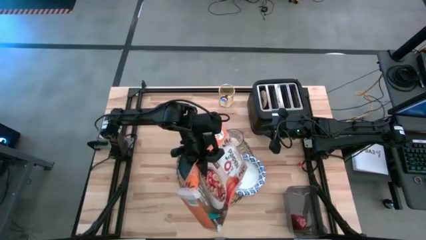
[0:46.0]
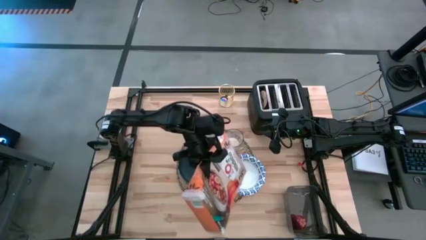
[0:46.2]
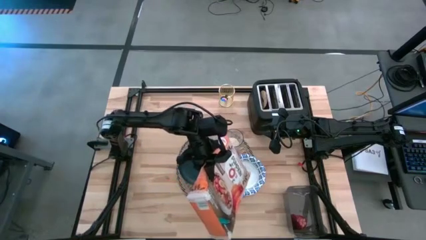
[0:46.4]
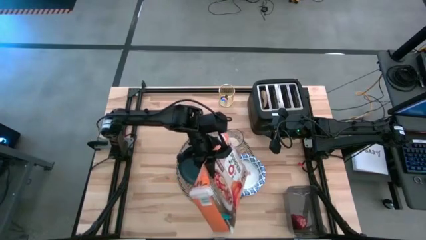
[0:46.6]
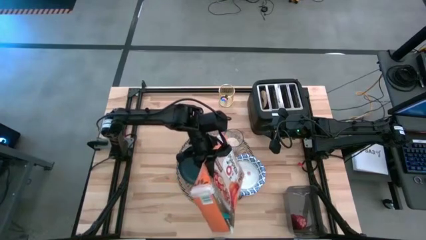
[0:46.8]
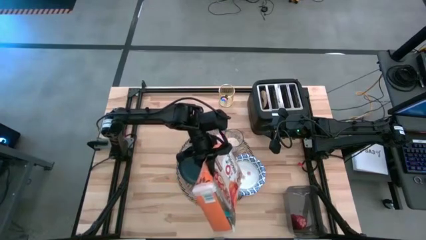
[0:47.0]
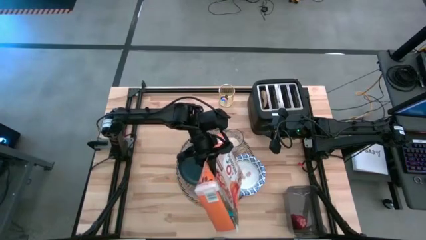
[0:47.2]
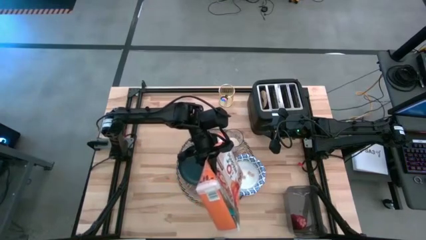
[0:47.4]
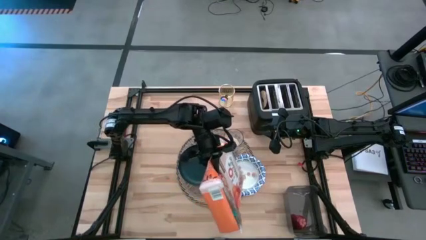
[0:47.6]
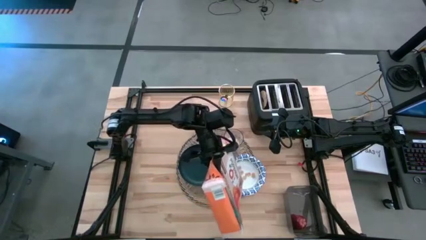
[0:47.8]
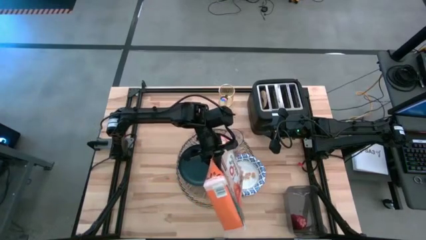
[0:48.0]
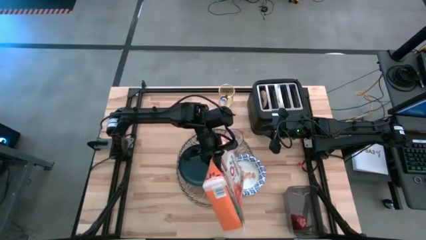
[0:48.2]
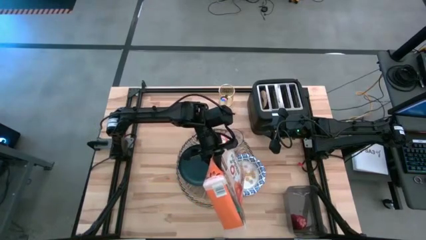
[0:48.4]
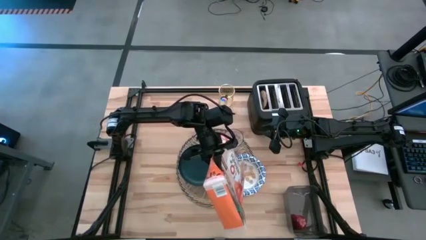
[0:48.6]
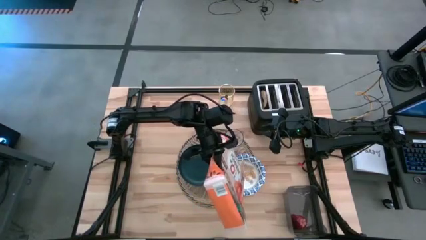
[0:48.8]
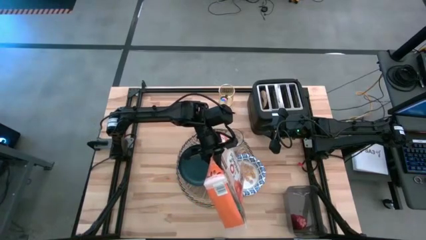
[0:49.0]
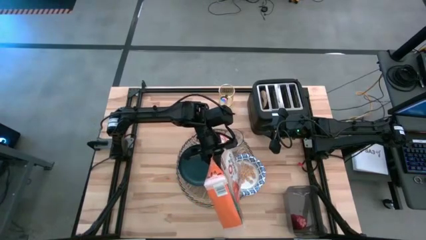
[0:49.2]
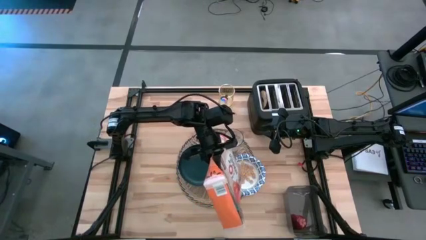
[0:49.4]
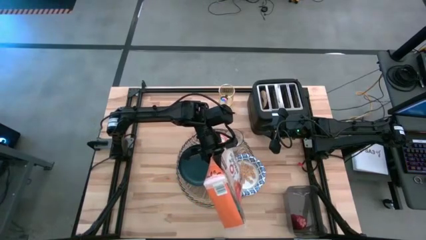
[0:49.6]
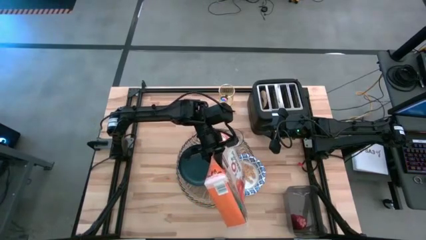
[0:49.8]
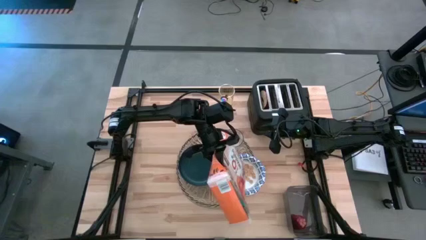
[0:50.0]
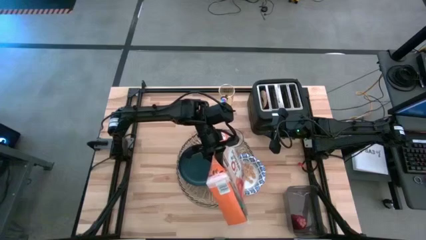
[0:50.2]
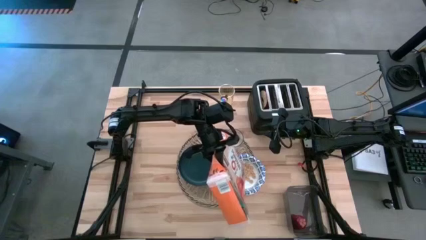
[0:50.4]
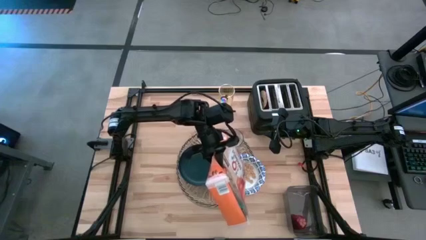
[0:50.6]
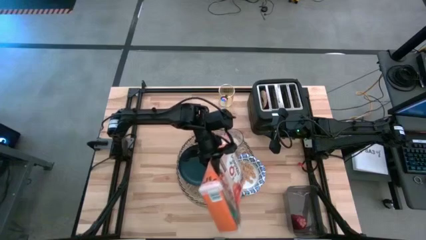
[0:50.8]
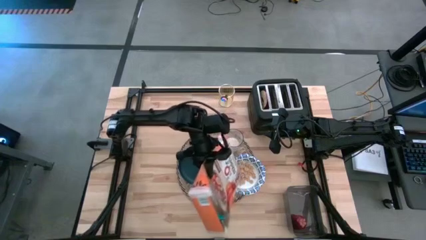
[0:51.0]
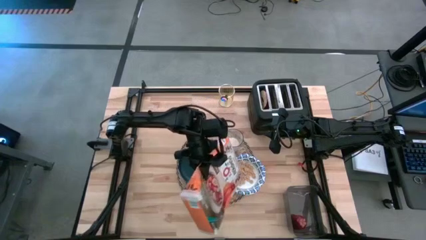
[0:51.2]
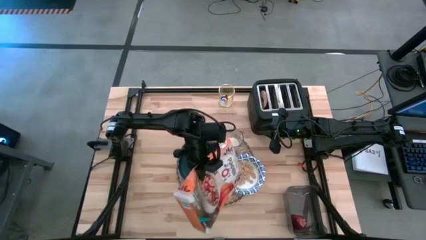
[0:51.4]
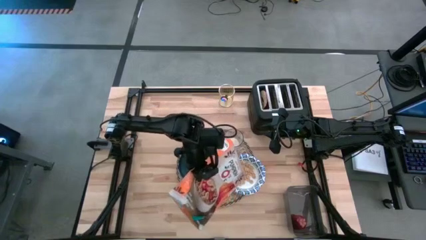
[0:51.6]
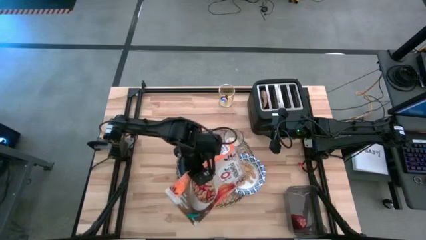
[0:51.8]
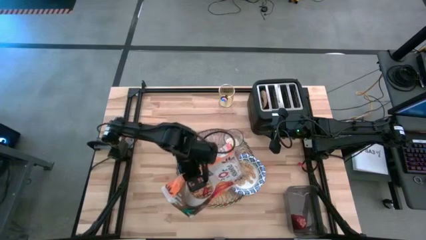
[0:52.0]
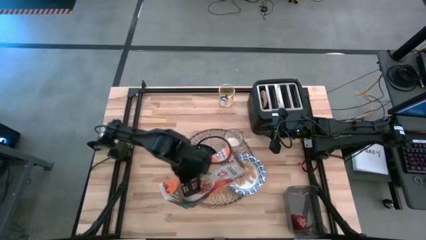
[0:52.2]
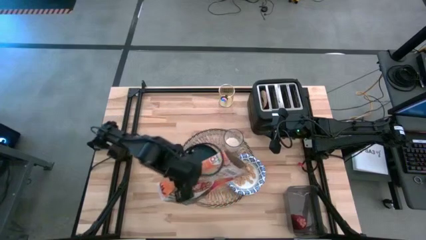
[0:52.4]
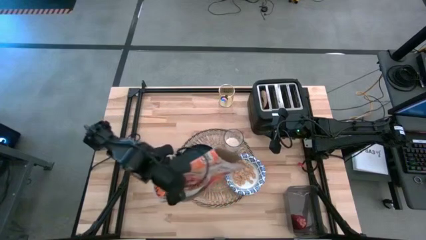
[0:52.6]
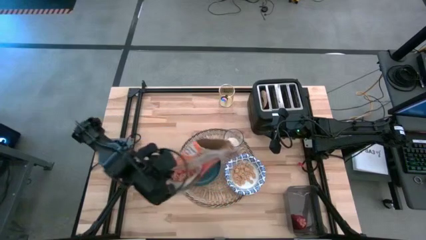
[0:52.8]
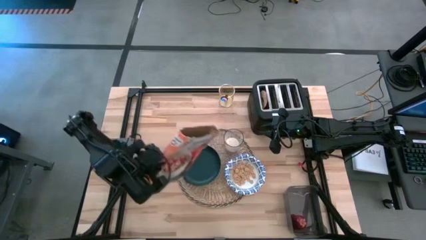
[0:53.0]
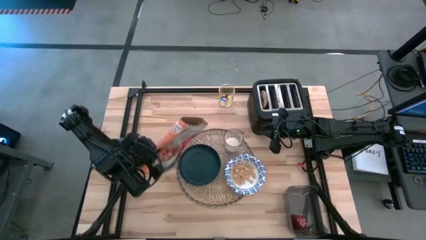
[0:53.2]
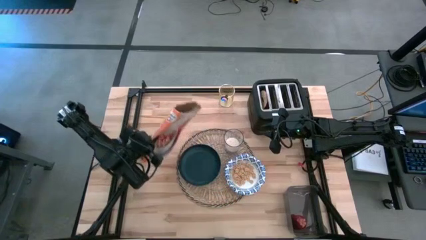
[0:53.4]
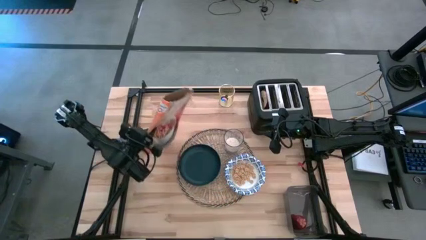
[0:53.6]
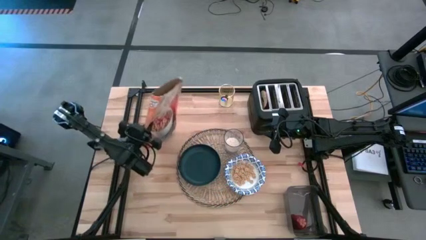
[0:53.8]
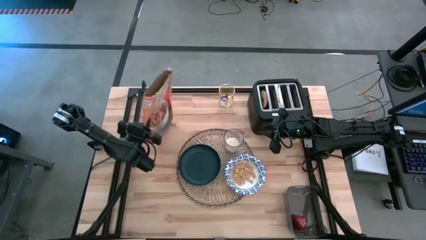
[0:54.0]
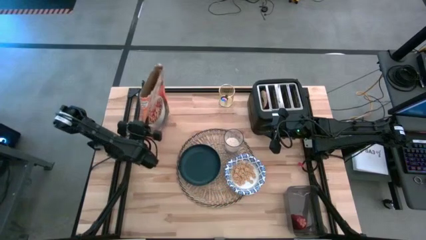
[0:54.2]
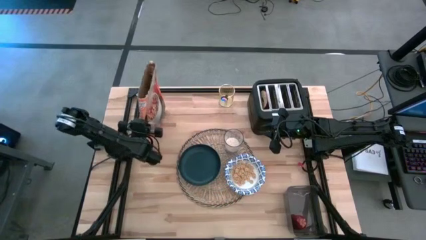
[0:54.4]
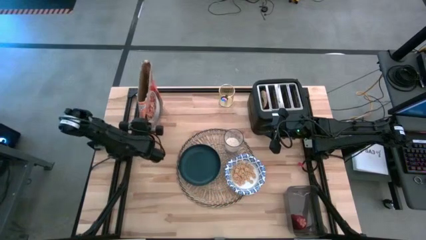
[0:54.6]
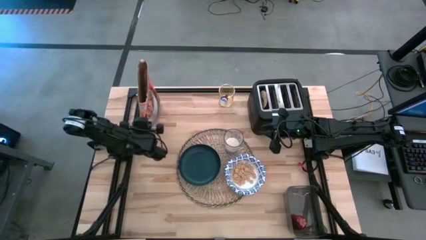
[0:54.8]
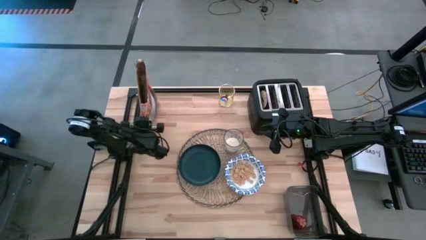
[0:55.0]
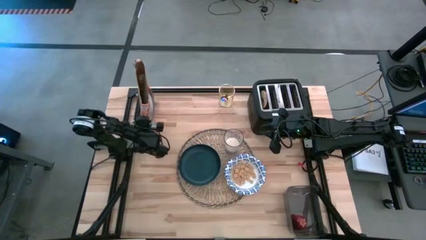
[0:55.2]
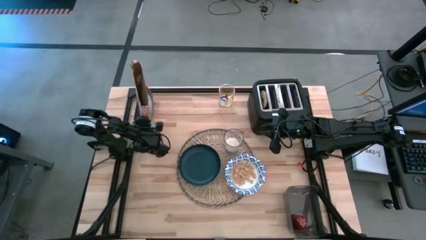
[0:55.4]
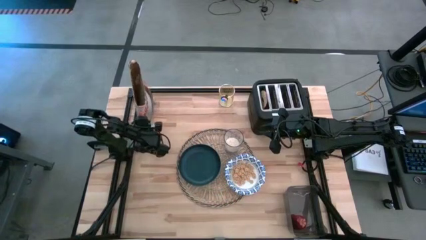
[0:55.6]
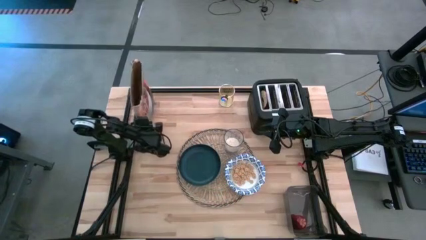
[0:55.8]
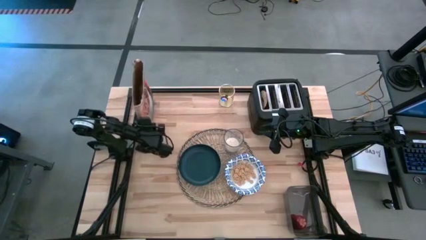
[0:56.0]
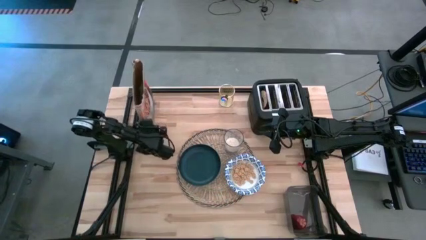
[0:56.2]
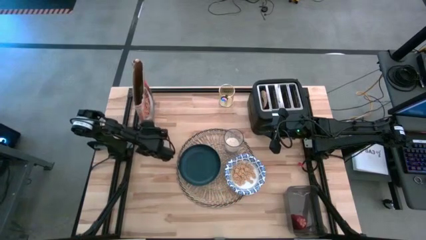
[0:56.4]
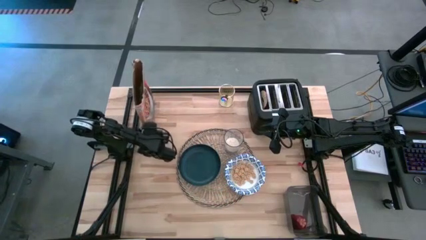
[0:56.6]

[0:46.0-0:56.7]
Task: Arrange a breakfast setting
Pour the cereal from the orange cereal box into the white patterned bowl
